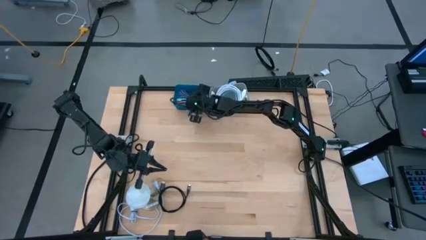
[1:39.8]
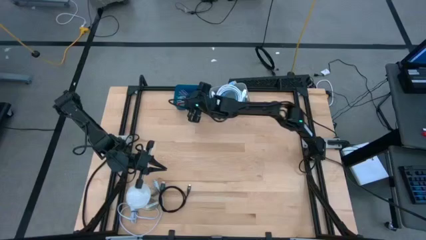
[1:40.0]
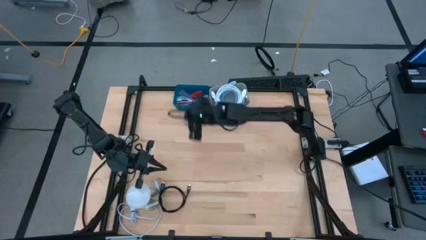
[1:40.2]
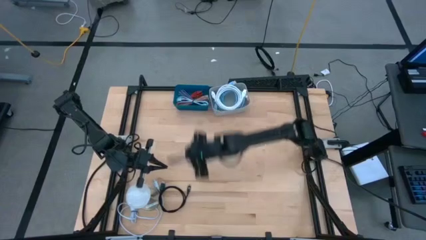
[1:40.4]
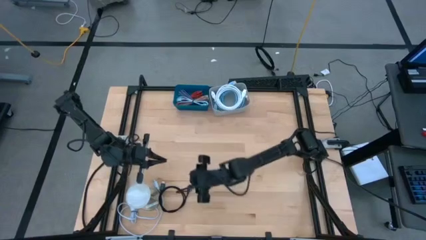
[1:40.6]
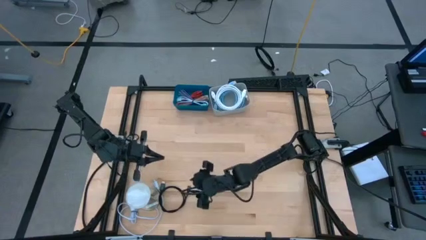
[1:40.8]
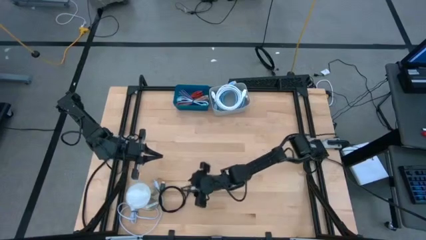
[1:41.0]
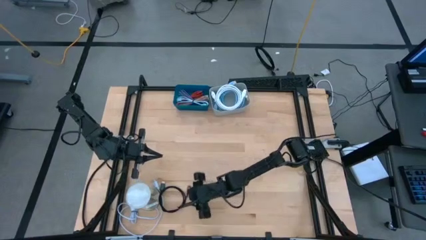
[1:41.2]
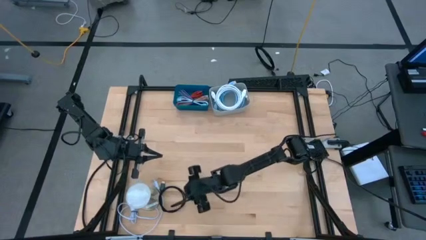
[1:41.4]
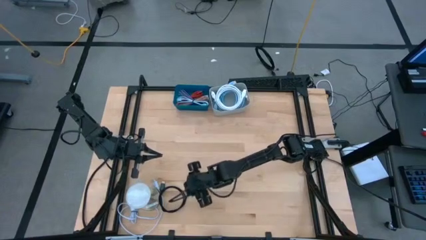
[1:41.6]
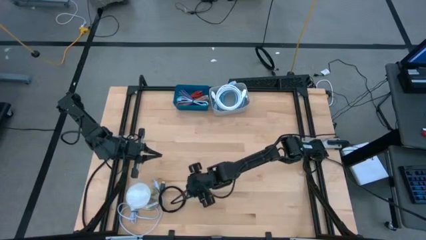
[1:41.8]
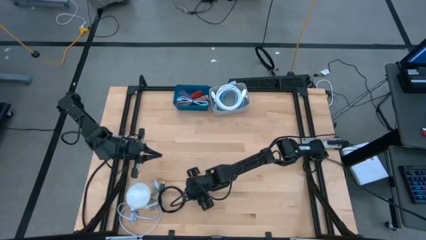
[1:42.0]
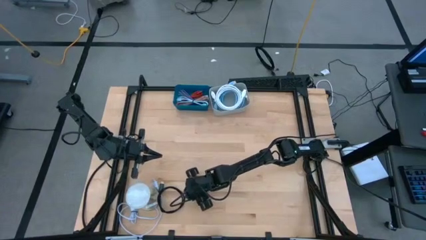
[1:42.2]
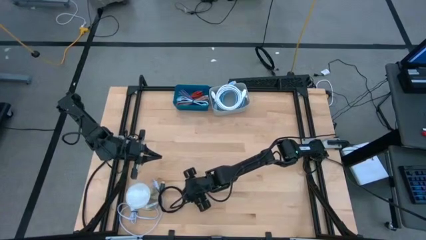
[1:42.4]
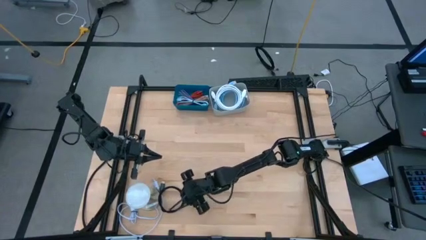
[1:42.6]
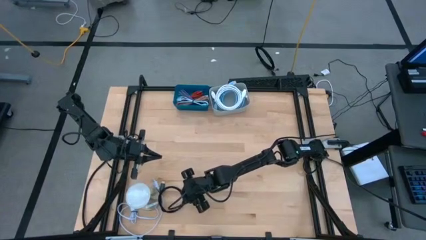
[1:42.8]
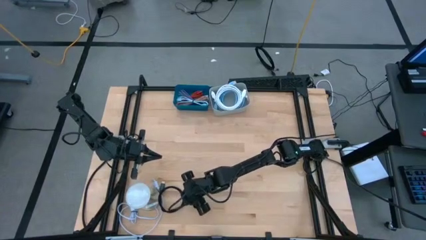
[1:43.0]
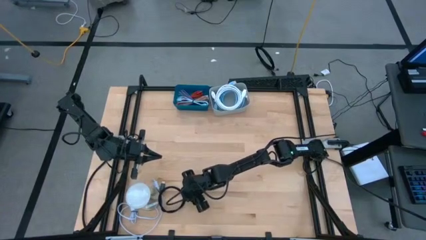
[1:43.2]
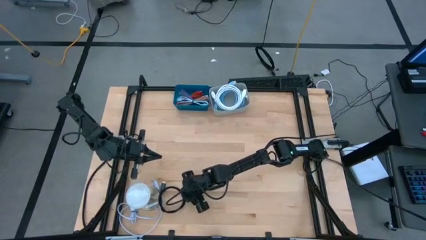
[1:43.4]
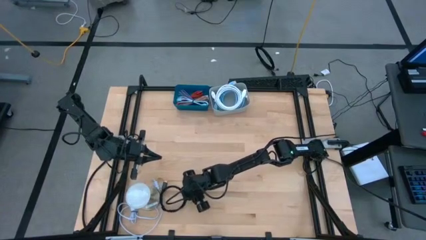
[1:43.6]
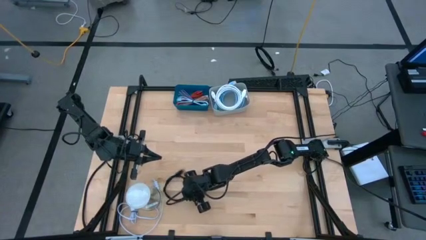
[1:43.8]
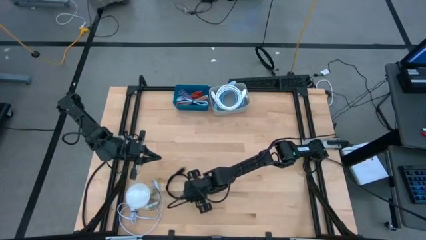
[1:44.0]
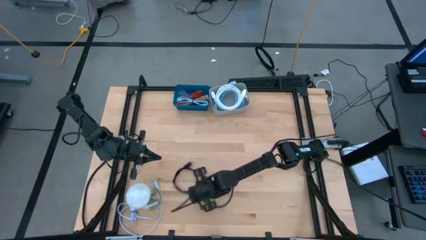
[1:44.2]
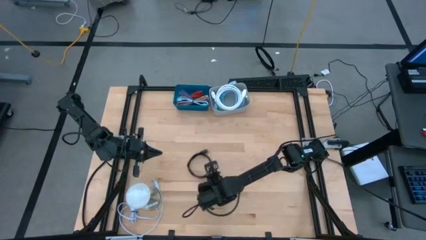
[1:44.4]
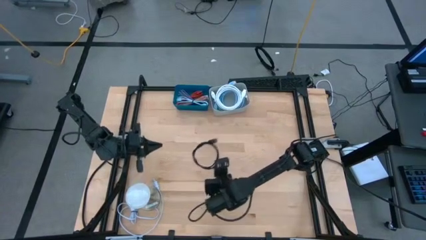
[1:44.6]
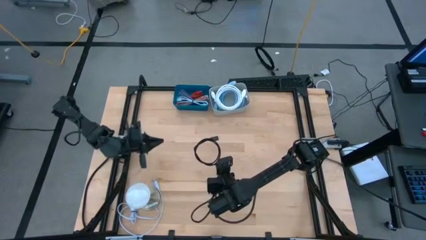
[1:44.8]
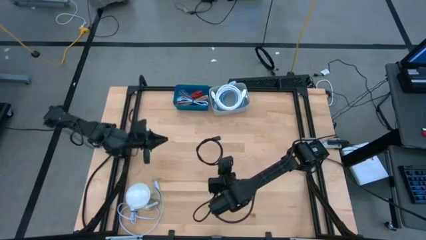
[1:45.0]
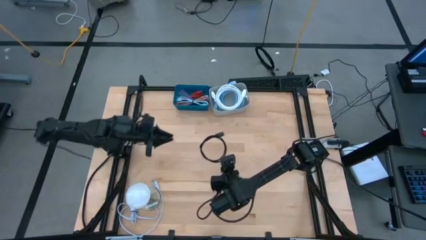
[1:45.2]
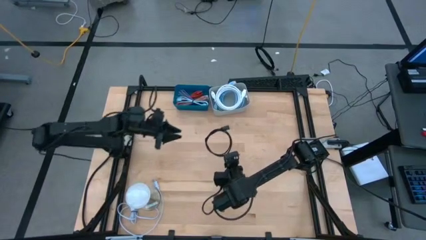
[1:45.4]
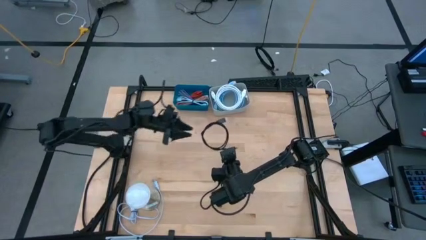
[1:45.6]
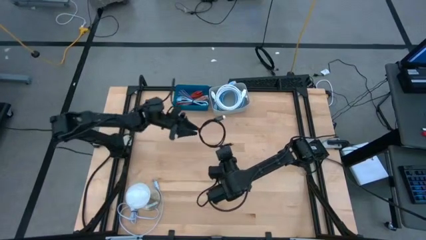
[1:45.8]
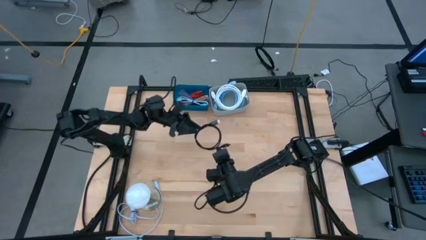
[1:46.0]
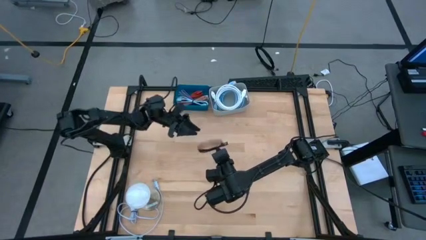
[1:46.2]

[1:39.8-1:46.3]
Task: Pick & Place USB Port
Put the black usb cable into the gray bin

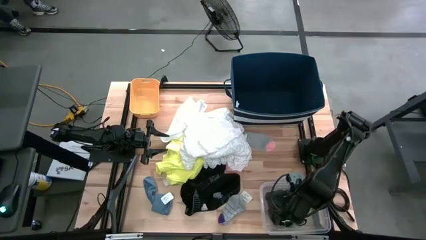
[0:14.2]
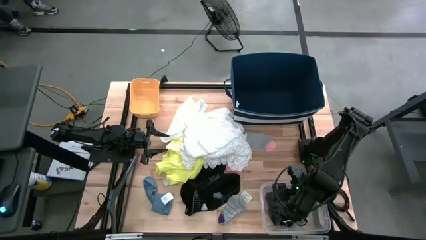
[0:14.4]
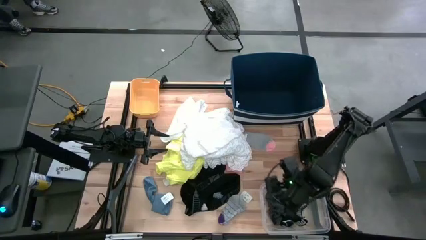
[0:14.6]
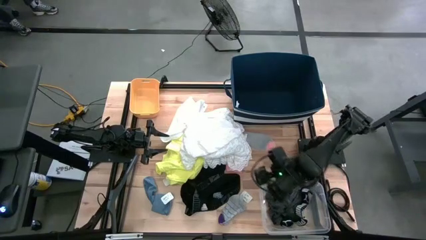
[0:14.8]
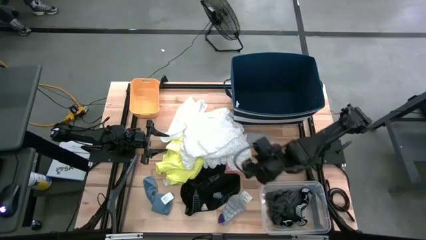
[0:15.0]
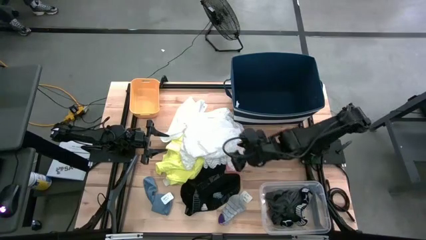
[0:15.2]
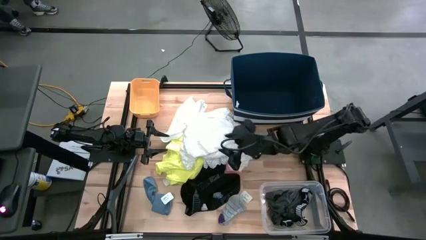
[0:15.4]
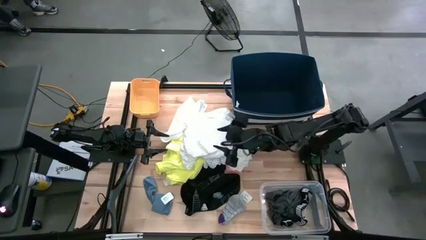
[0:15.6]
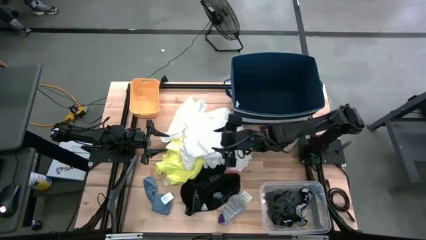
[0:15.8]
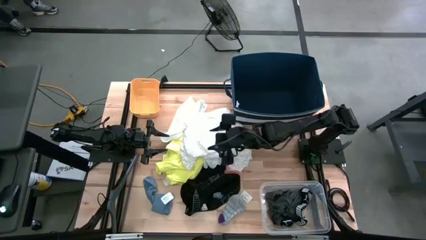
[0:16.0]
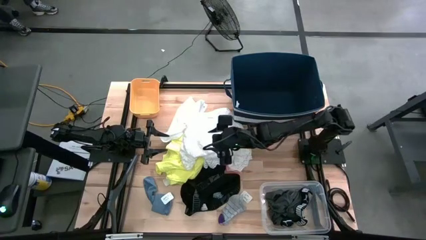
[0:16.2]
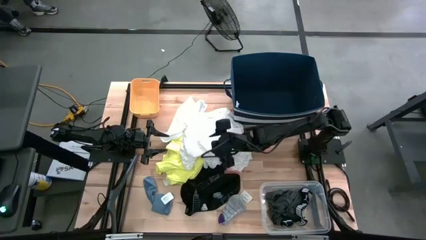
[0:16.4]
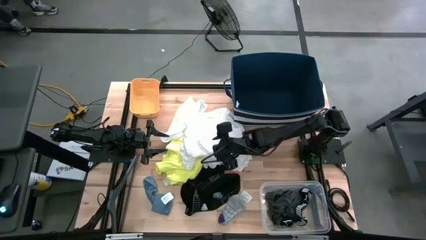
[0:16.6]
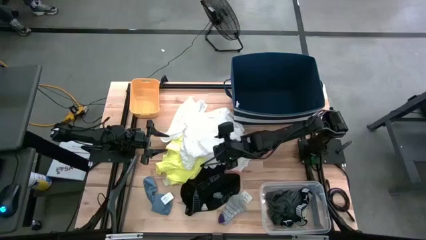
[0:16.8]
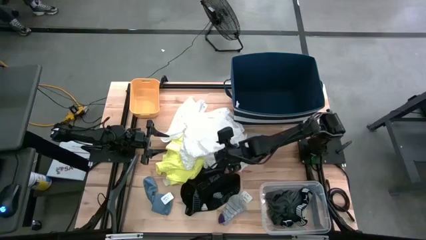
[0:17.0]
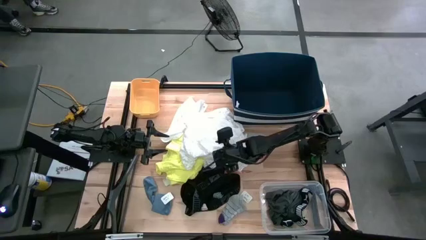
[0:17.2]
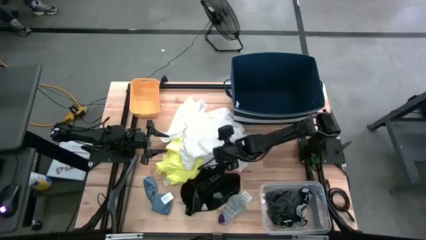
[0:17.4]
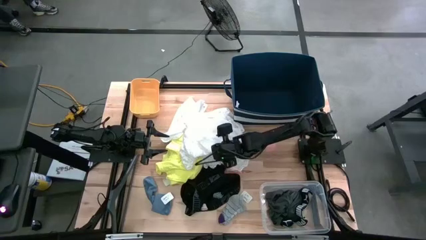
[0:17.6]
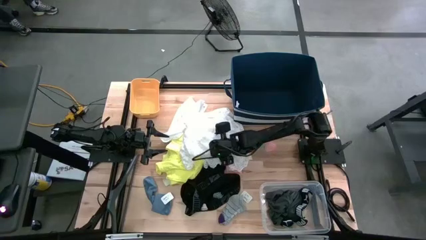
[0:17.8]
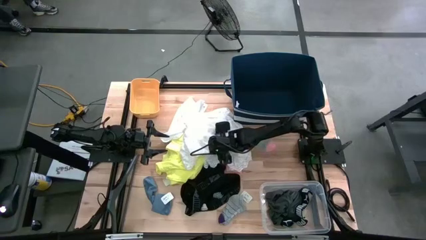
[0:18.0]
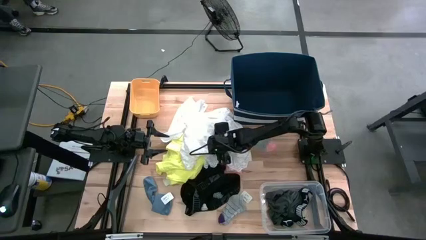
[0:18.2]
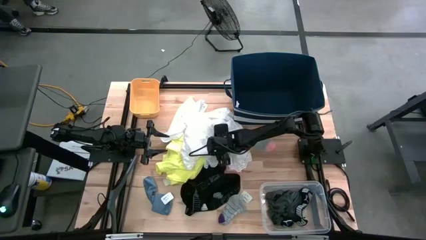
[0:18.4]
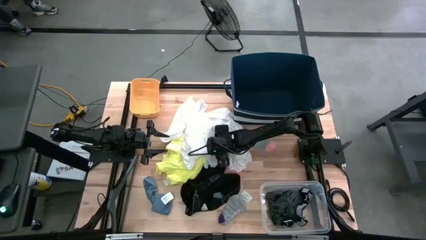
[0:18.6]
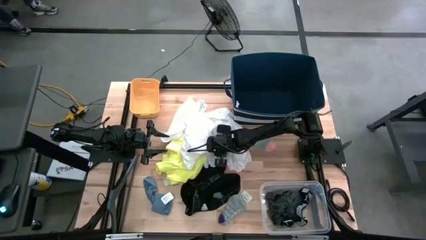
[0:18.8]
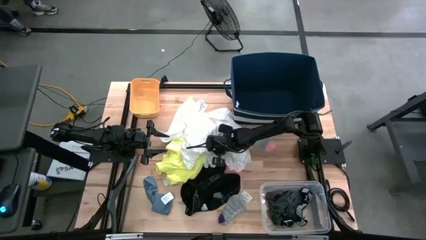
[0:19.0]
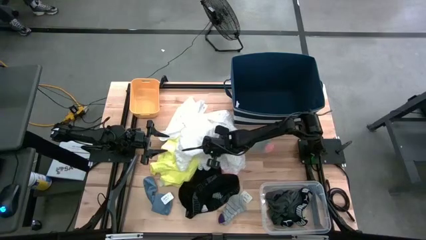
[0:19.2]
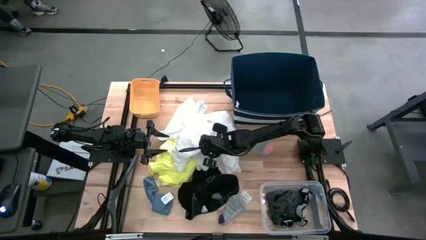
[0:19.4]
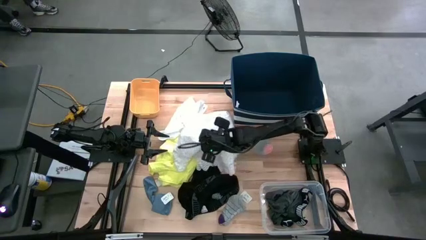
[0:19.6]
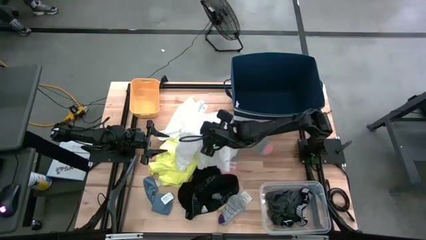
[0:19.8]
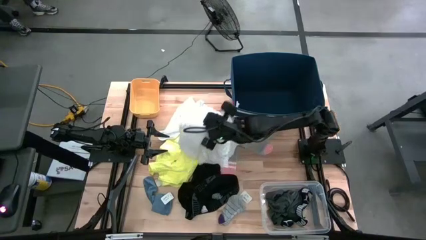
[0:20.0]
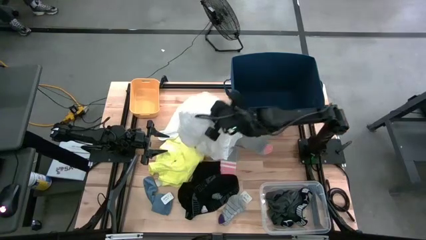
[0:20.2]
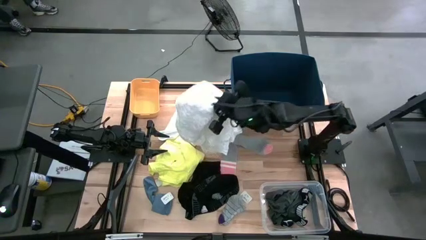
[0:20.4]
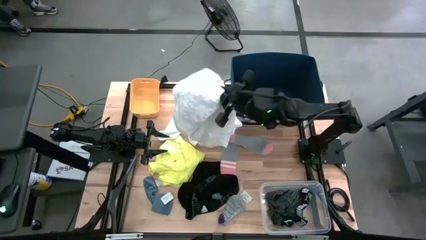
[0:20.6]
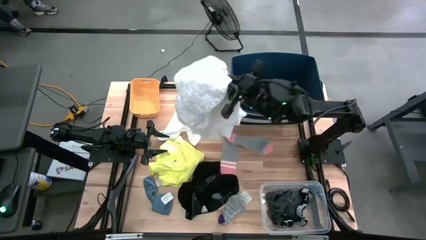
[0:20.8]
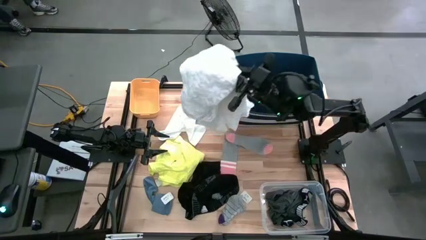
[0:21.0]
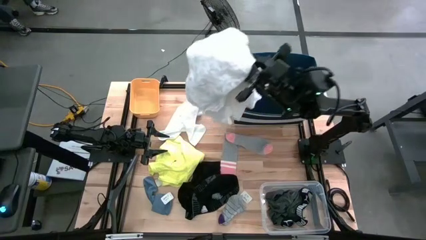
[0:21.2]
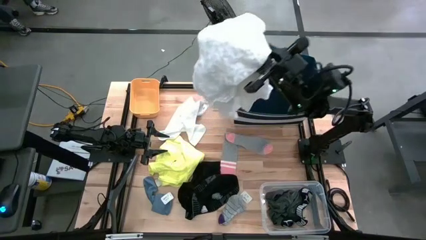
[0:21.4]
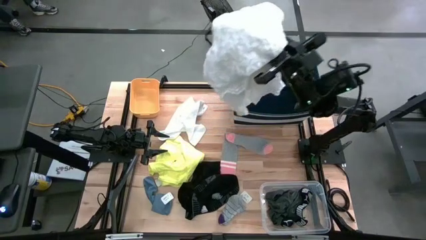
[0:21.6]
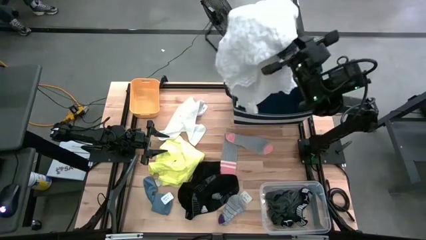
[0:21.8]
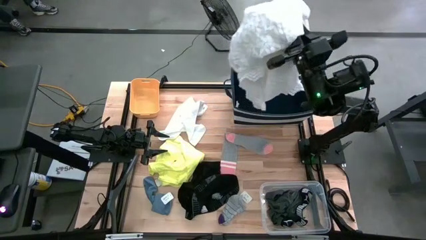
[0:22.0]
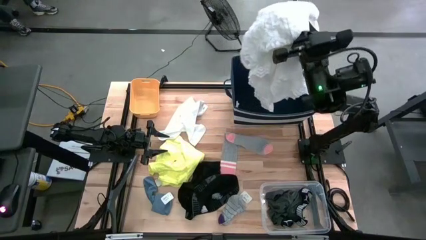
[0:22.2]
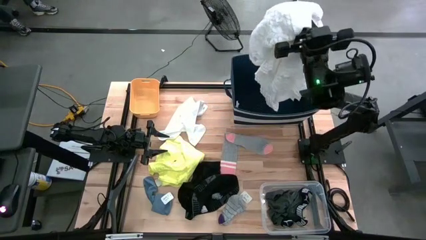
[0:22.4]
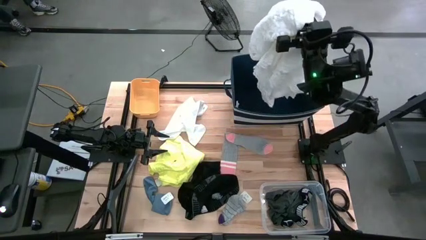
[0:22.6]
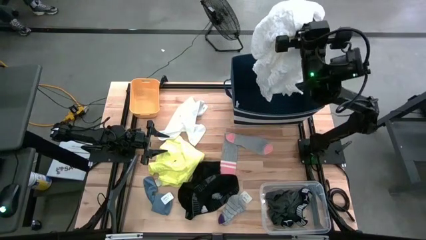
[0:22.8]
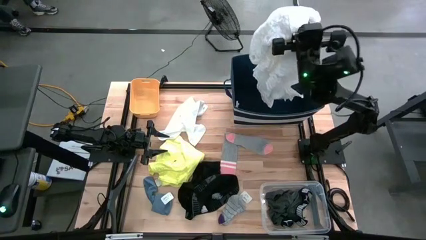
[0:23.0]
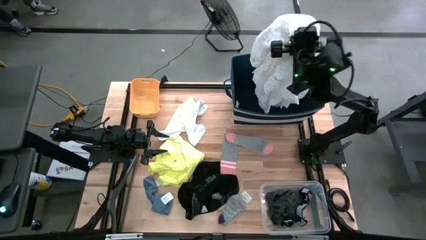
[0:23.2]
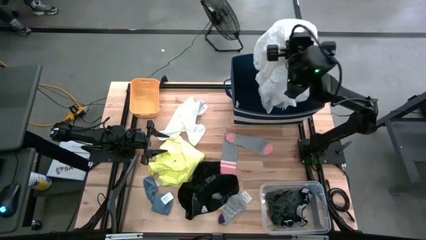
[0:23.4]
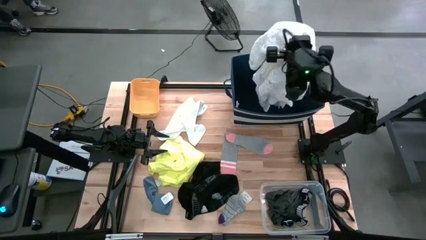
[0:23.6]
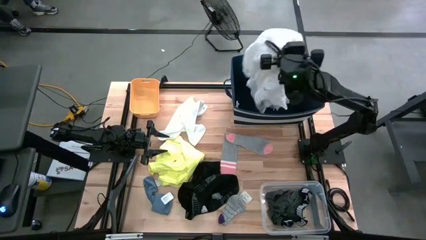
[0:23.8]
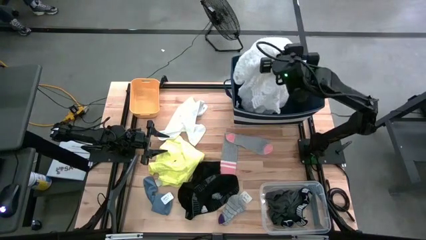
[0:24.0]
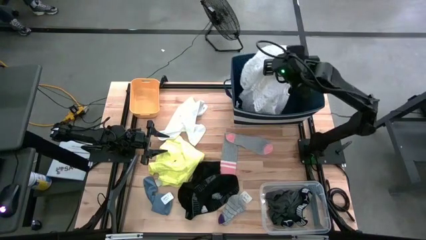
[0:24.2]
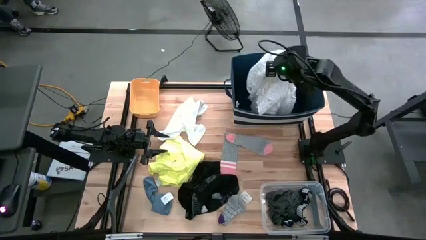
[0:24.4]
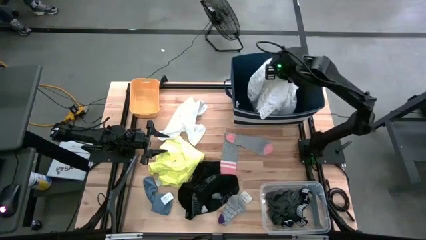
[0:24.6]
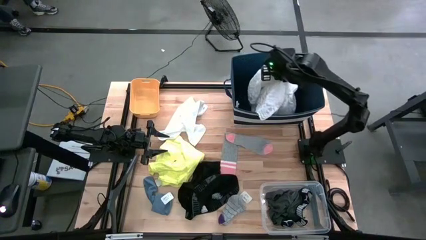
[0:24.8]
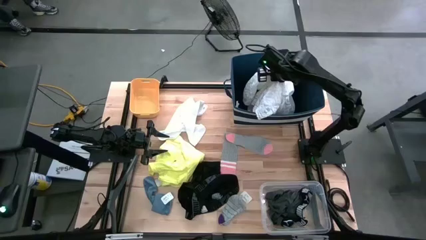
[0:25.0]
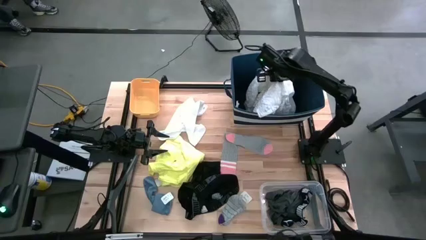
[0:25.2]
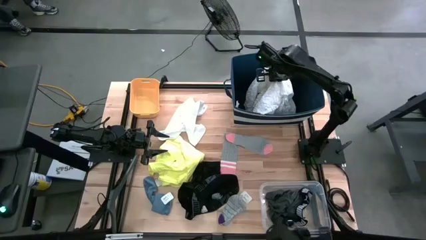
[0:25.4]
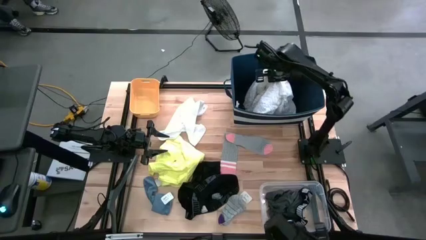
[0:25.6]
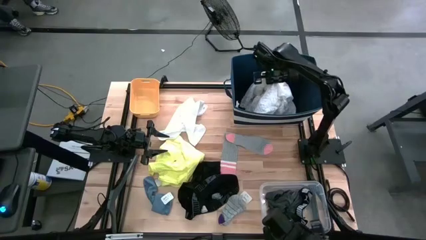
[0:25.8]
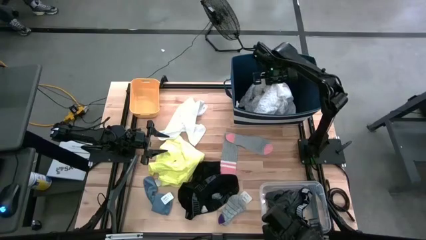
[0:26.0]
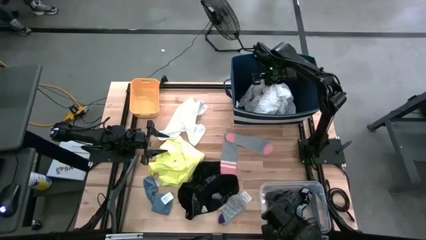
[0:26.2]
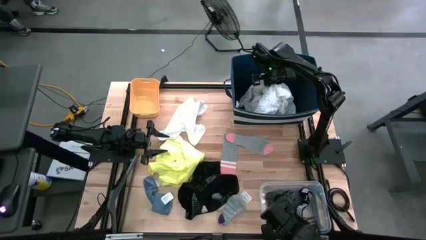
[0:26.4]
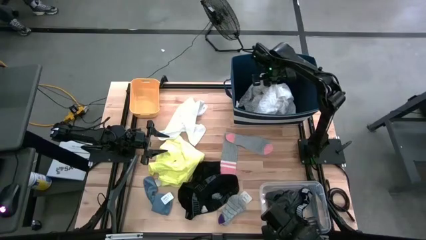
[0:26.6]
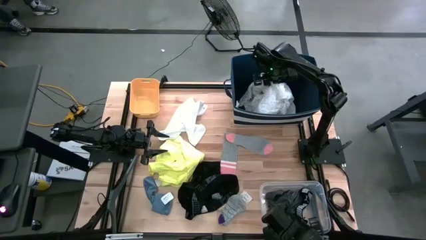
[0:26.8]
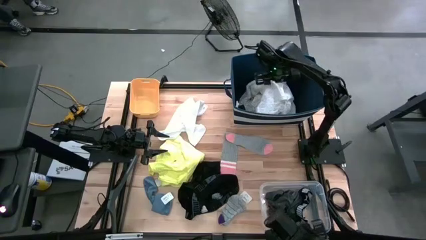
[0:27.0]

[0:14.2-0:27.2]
Task: Pick & Place Cloths
Put the white shirt into the blue bin
